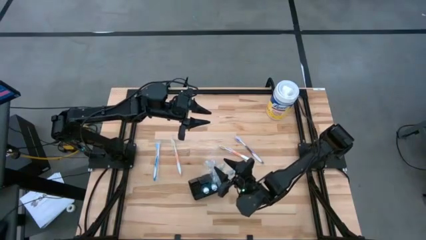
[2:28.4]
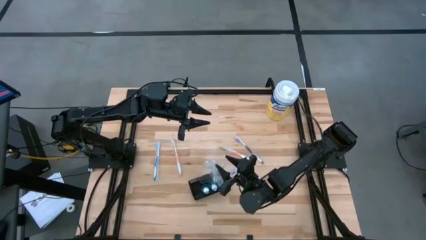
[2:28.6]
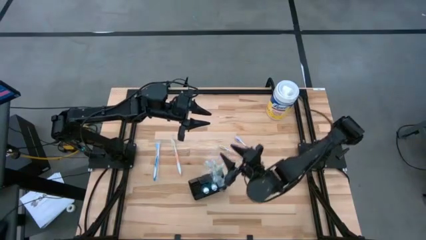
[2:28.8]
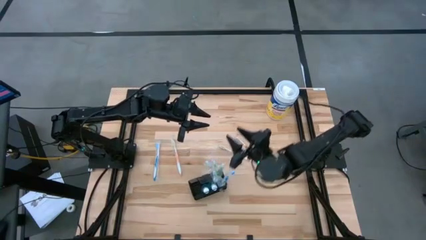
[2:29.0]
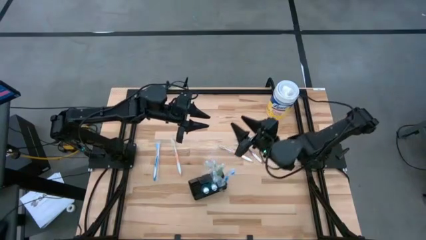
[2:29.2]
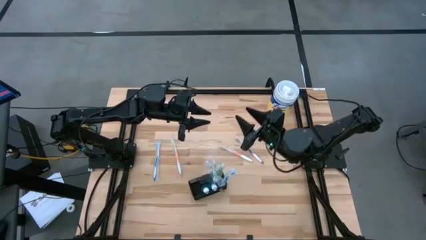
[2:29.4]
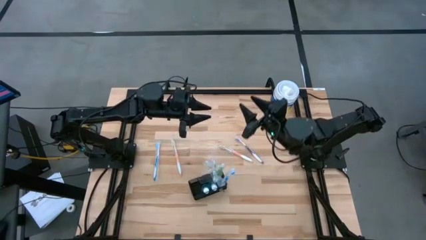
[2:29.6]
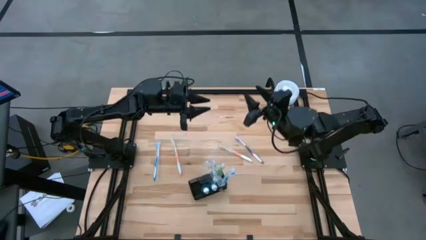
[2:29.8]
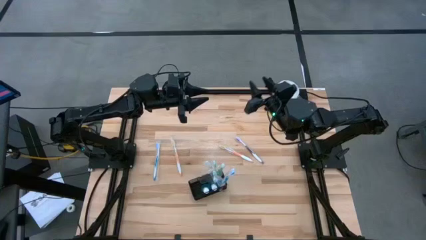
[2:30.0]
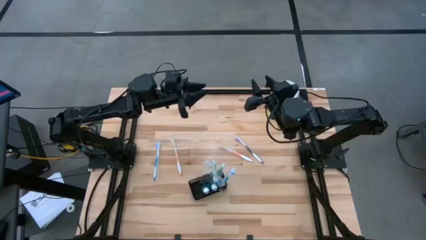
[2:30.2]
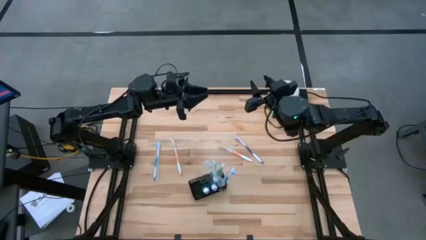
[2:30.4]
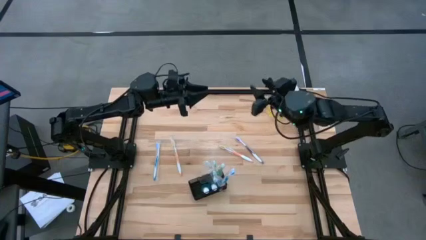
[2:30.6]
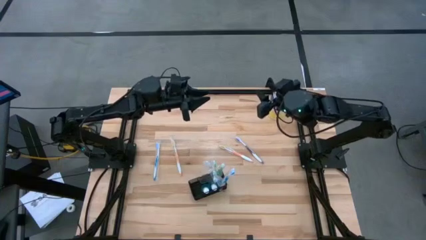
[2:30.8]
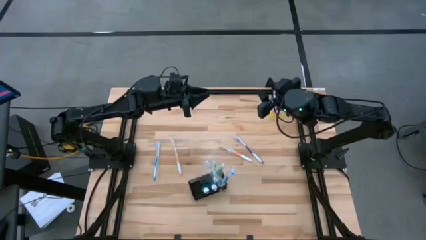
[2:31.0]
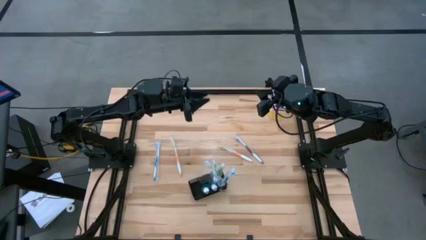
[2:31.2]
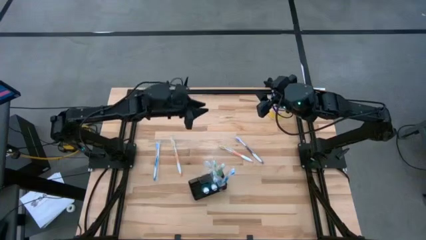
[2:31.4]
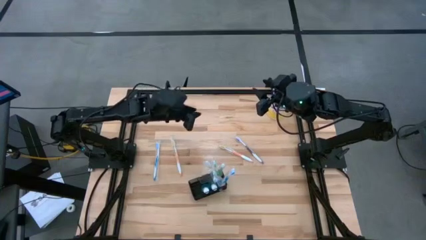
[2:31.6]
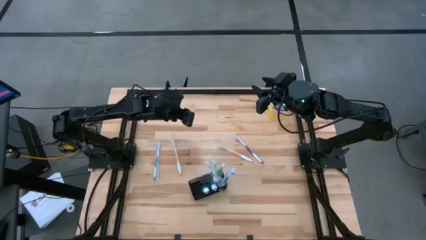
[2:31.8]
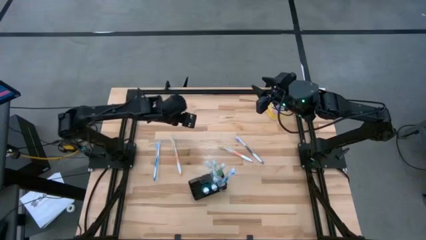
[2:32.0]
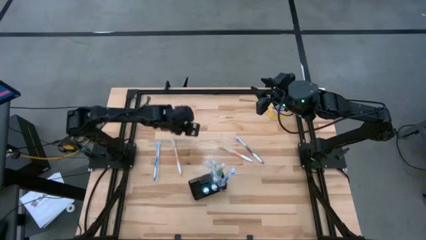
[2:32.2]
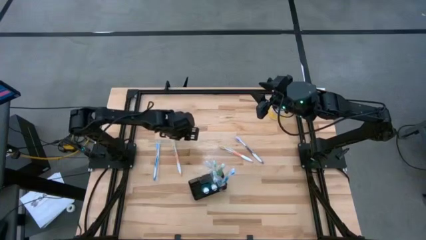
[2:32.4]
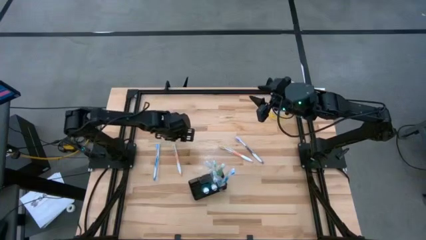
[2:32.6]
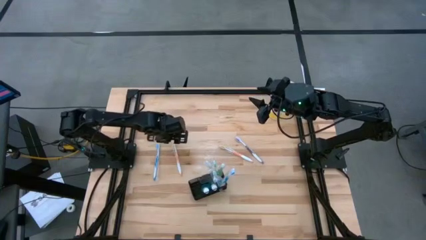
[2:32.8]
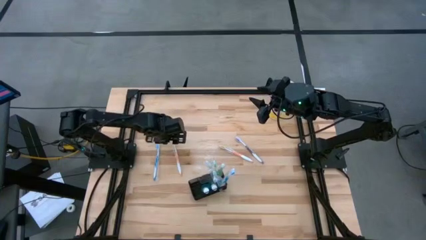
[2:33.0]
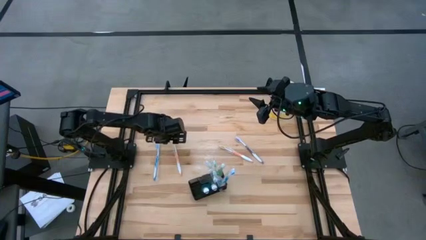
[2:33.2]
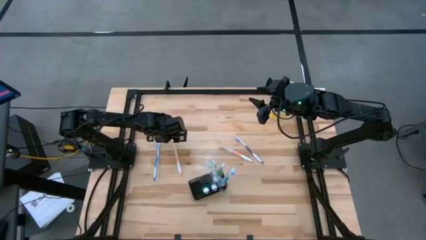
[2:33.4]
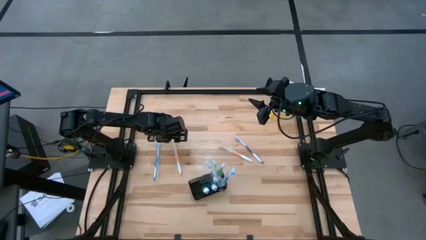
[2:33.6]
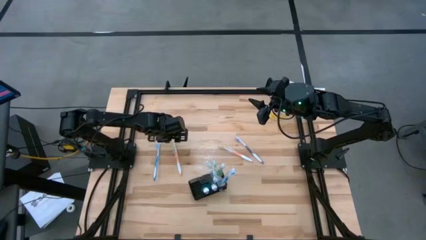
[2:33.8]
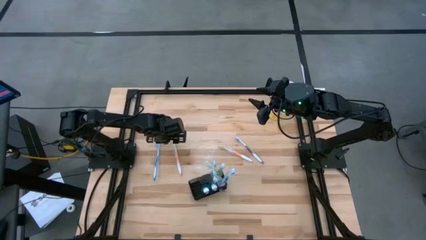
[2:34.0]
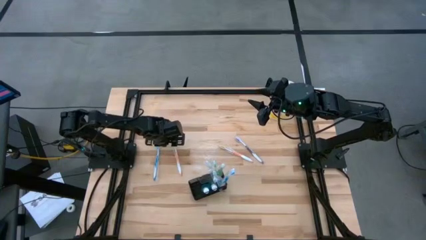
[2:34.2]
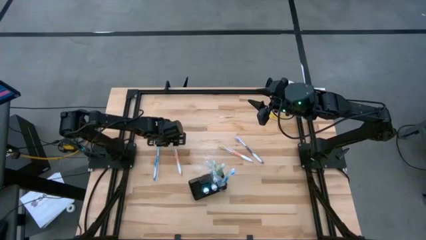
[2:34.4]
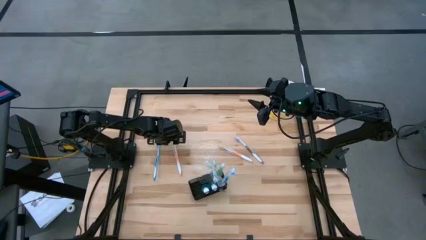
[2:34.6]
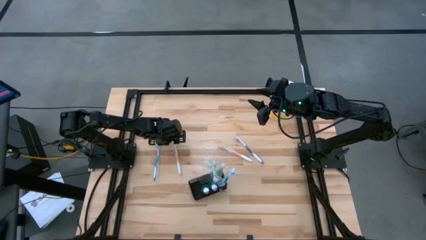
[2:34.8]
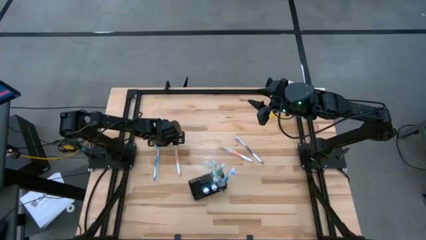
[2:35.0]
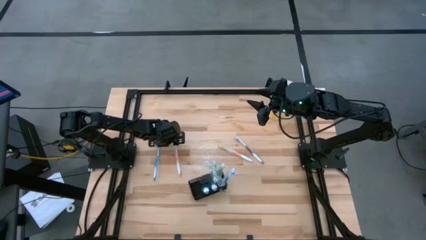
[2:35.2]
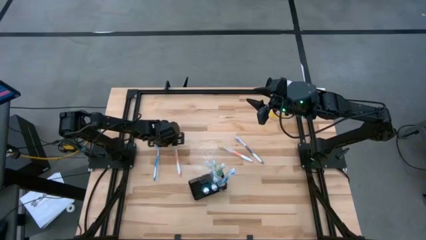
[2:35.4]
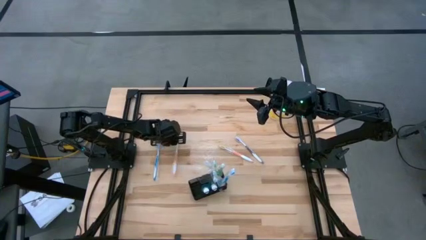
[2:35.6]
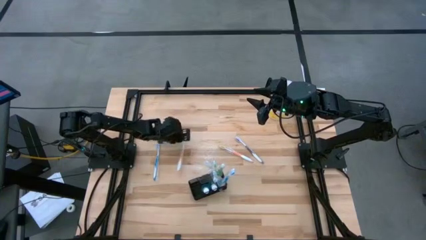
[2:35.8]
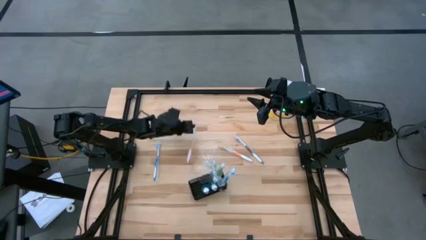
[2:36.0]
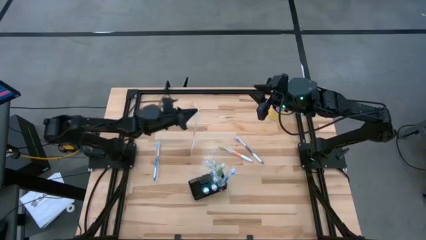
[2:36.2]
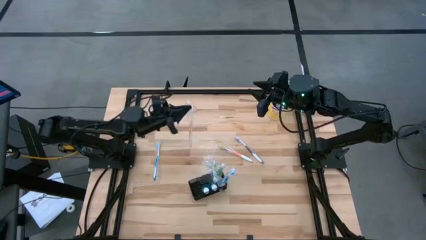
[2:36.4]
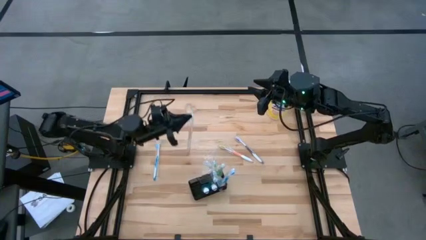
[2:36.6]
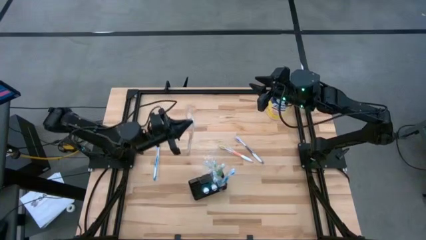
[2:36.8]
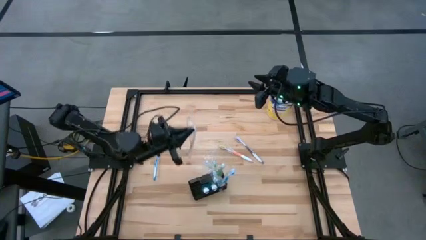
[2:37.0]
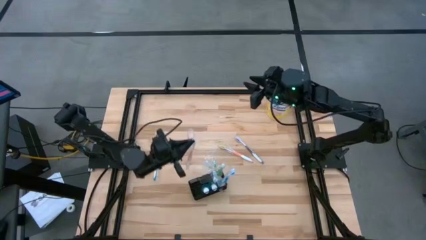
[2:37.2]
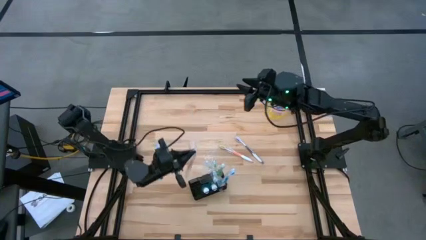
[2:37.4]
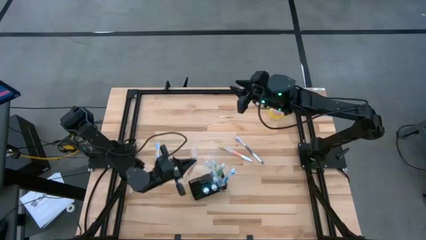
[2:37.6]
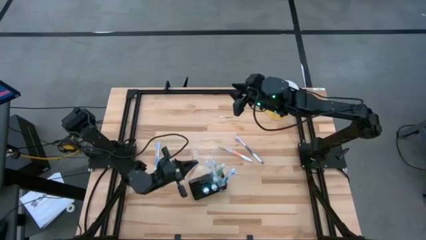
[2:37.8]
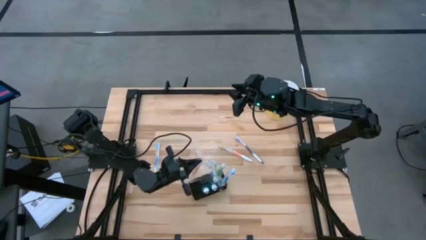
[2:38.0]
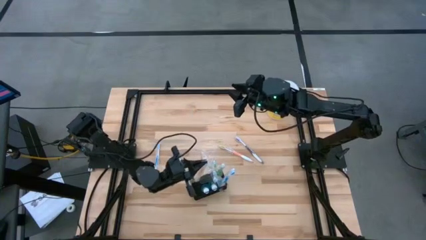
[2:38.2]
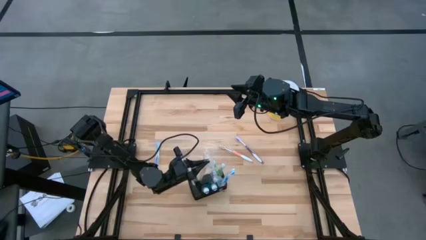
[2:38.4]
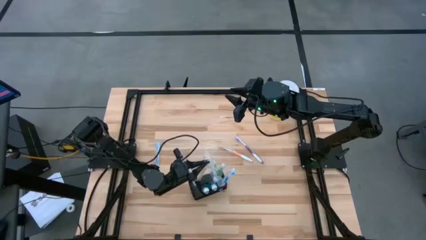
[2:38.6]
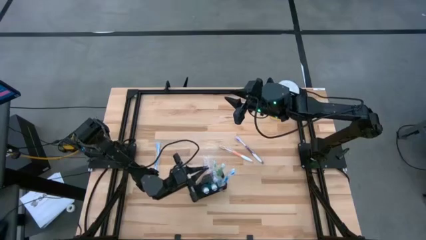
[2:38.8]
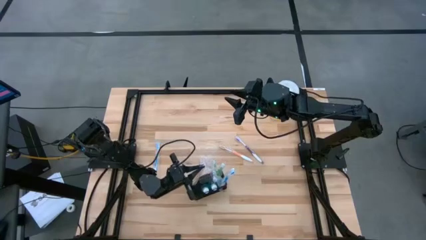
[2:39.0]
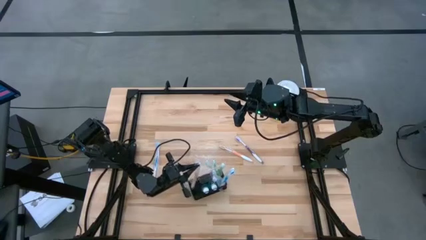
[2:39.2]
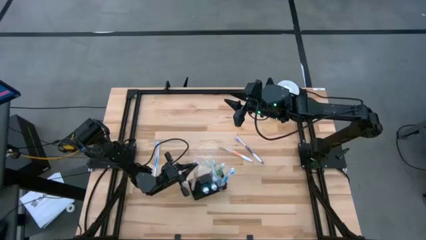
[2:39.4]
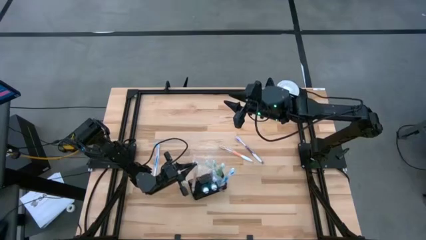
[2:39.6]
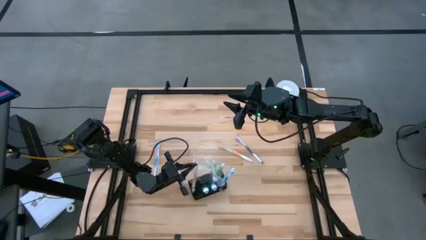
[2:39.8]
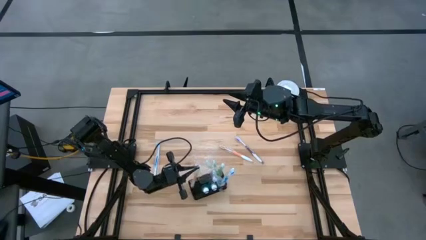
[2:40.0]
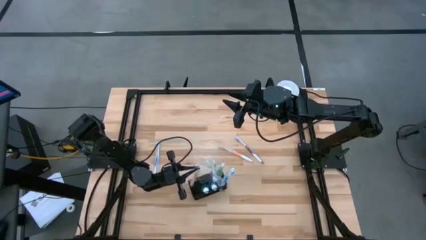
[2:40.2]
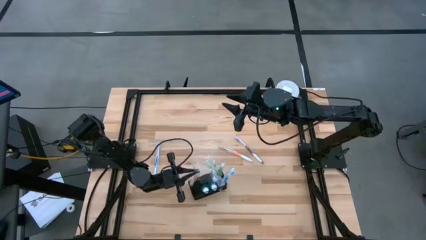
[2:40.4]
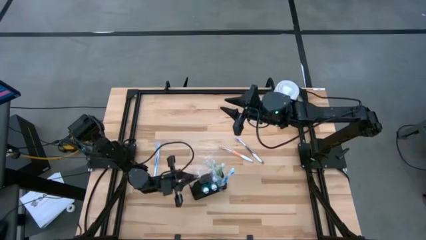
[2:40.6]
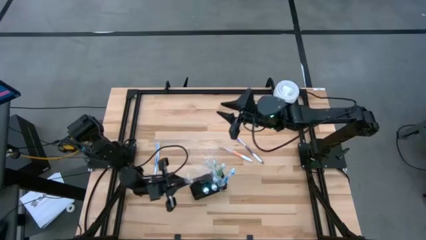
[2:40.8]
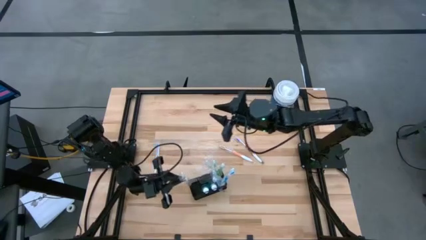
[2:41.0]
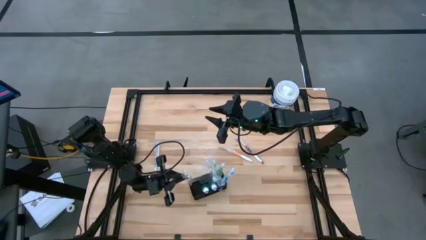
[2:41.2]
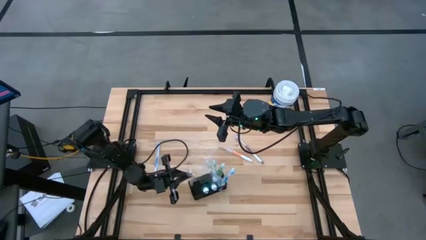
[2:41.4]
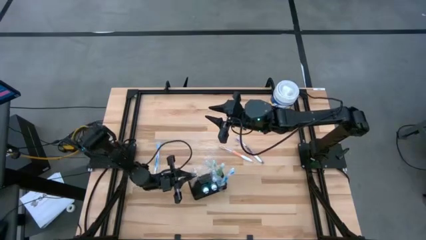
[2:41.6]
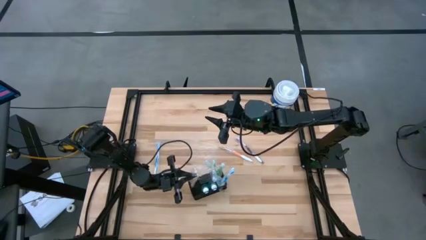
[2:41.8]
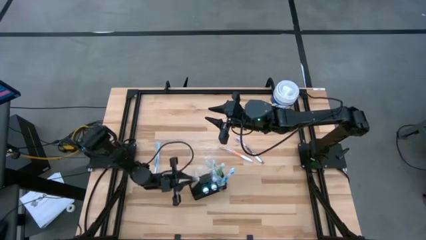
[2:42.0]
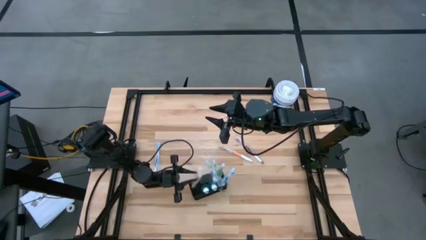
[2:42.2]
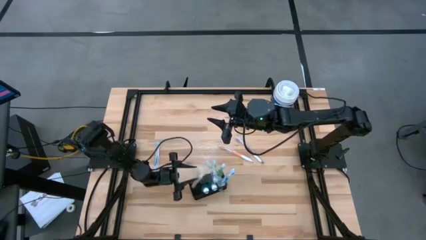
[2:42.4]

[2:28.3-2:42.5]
Task: Pick & Place toothbrushing station
Put the orange toothbrush into the mesh organizer

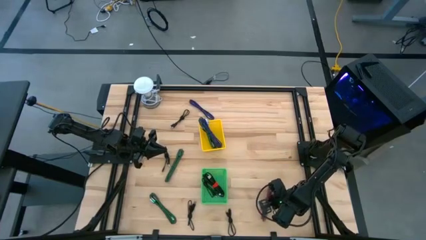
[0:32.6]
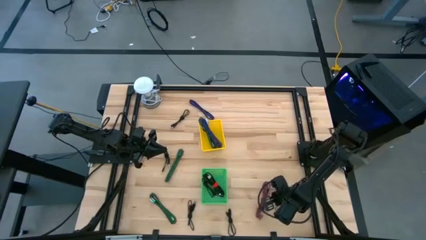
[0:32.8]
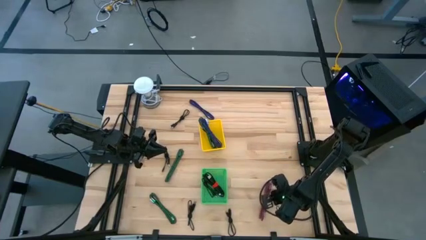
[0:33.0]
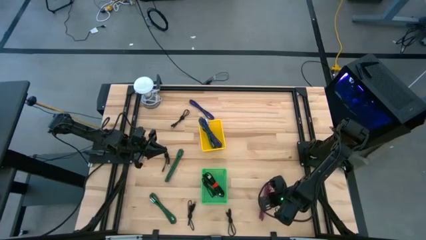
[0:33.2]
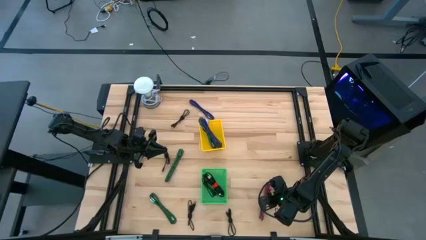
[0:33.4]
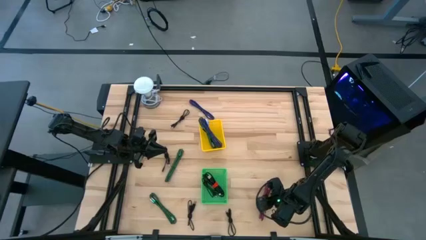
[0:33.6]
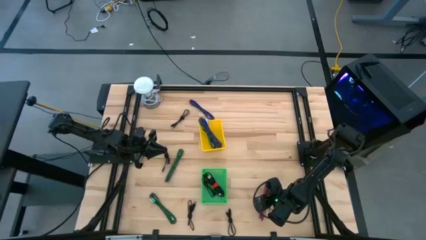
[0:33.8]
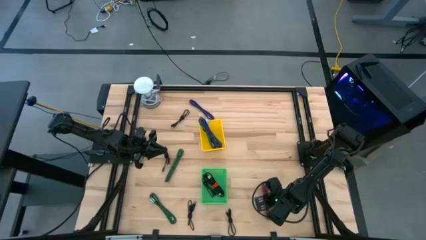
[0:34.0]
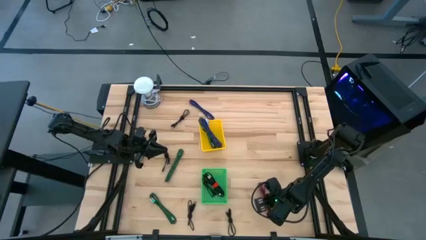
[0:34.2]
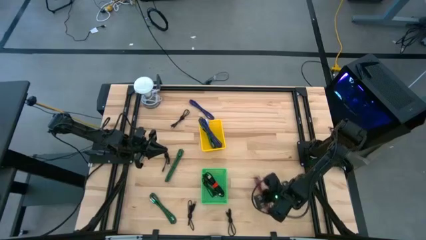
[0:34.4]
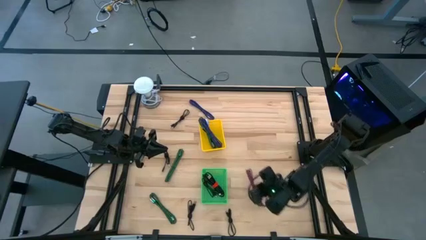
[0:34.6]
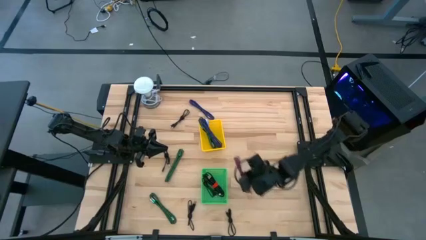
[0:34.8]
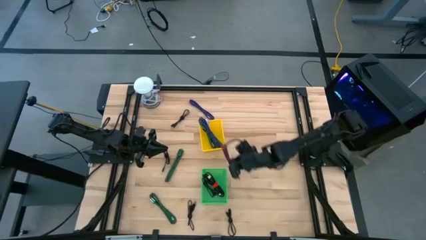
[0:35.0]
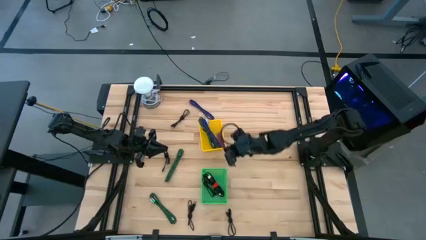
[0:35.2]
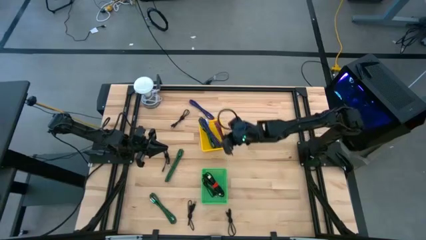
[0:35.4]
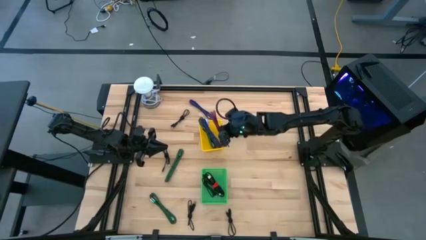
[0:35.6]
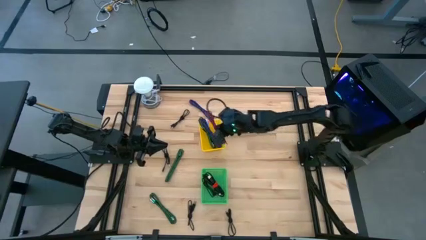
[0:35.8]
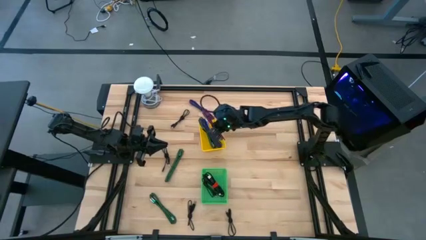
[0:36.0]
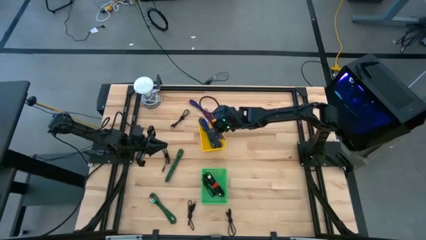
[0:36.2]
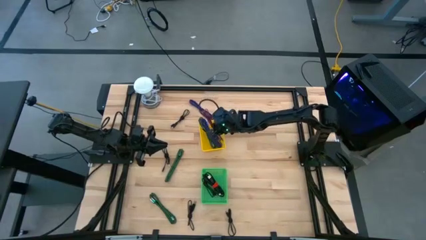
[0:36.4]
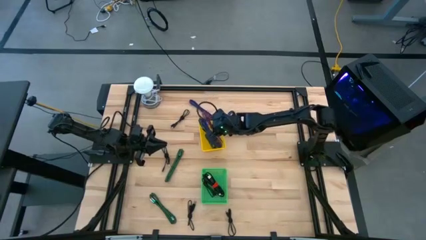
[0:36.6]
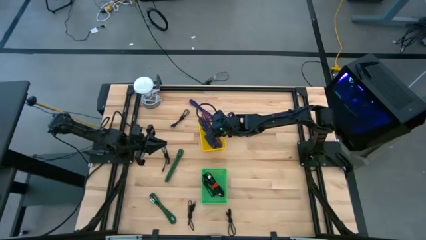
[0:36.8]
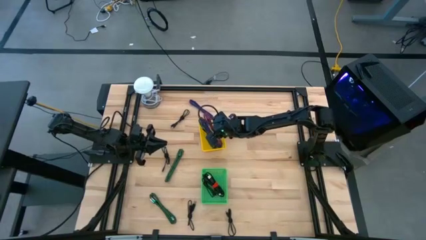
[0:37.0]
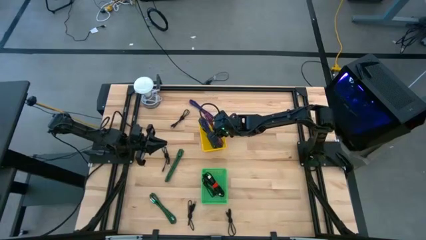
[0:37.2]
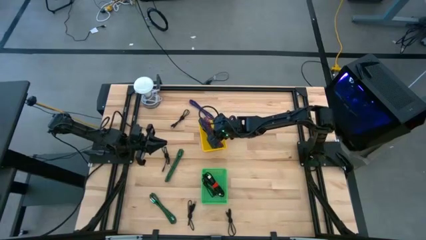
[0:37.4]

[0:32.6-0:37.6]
Task: Pick & Place USB Port
Put the black and pink charger cable into the yellow bin
